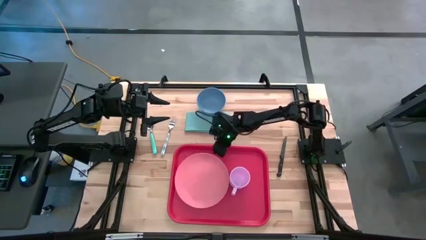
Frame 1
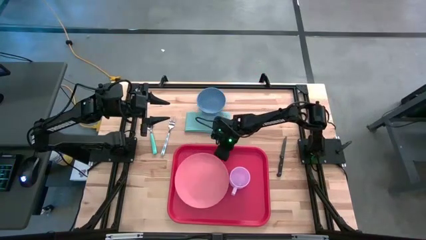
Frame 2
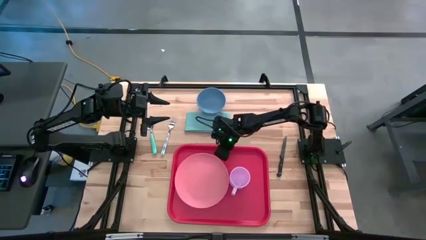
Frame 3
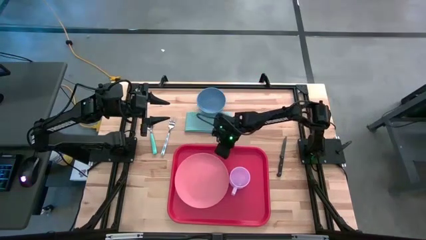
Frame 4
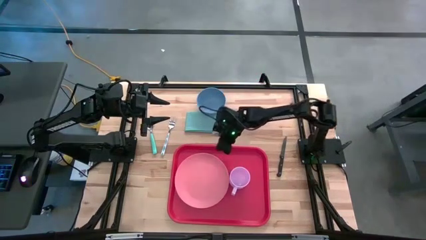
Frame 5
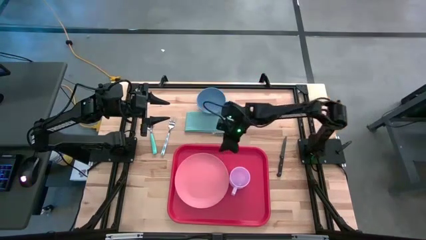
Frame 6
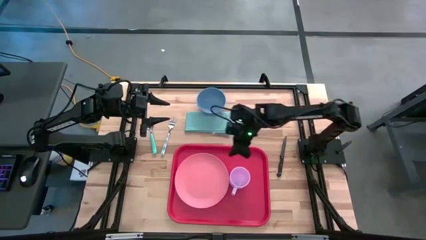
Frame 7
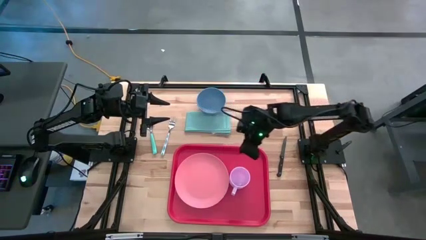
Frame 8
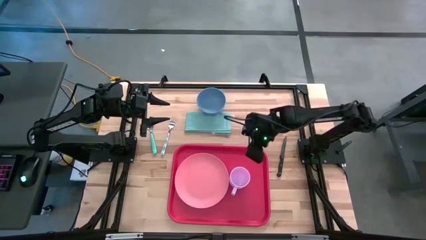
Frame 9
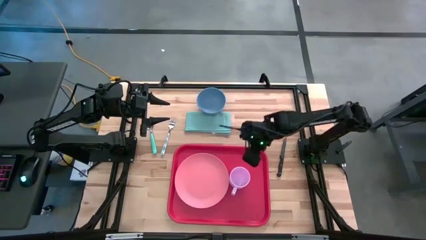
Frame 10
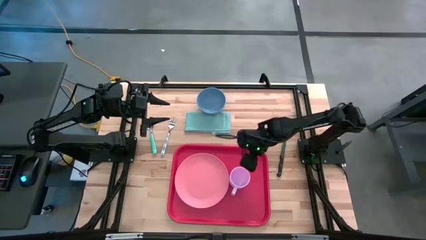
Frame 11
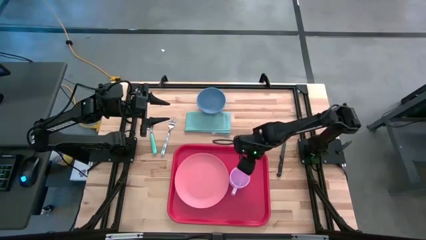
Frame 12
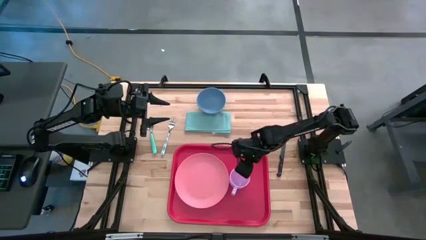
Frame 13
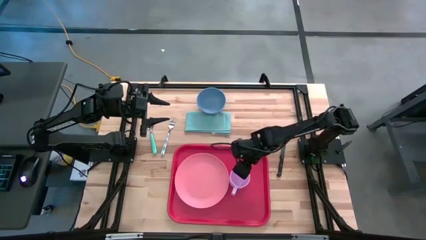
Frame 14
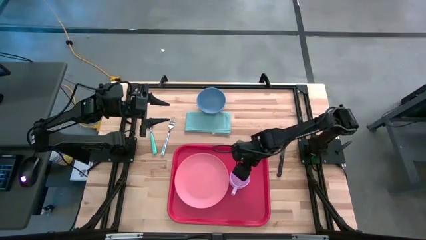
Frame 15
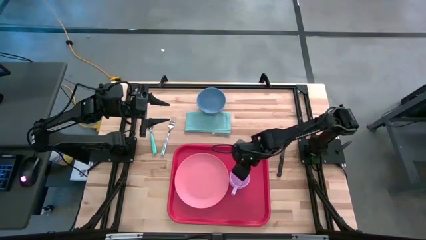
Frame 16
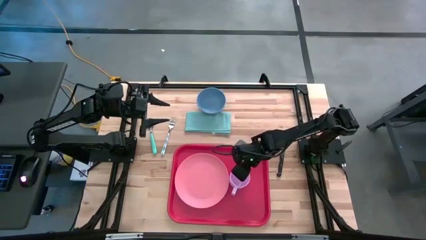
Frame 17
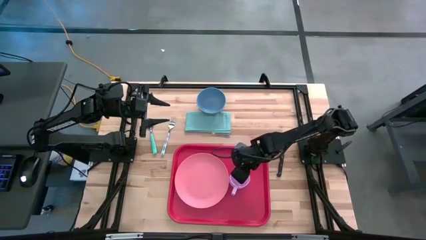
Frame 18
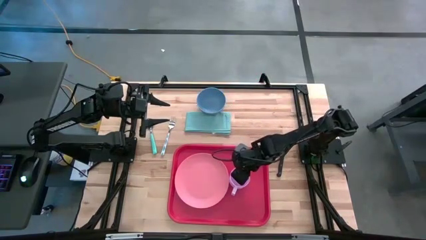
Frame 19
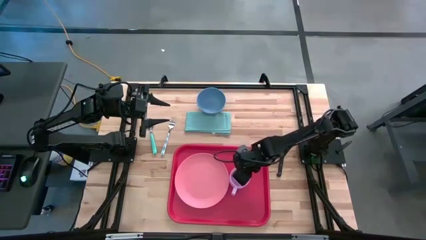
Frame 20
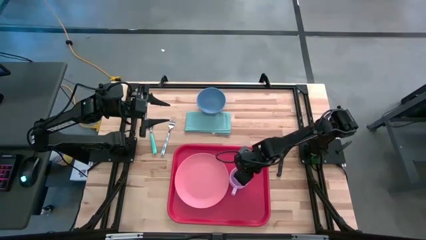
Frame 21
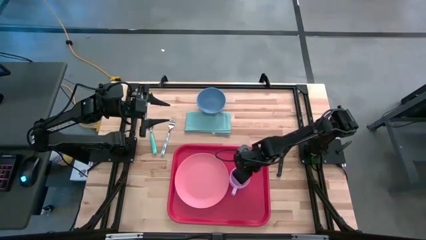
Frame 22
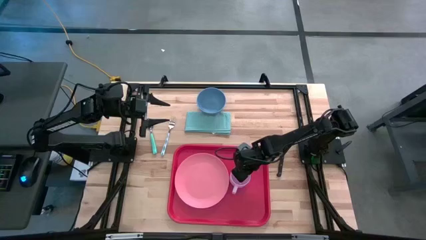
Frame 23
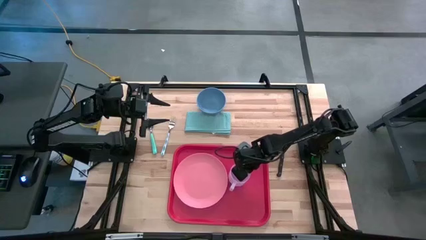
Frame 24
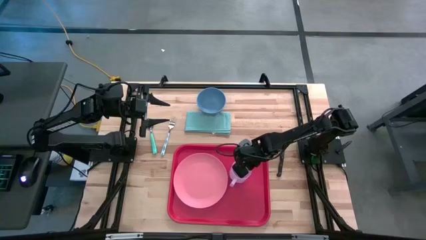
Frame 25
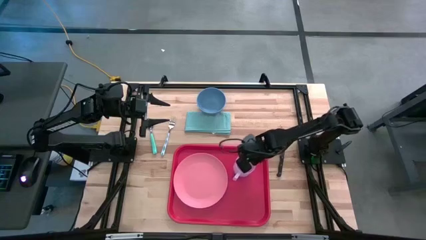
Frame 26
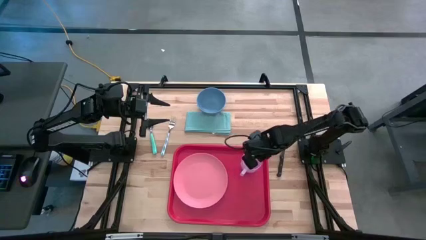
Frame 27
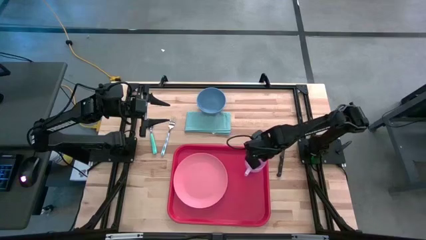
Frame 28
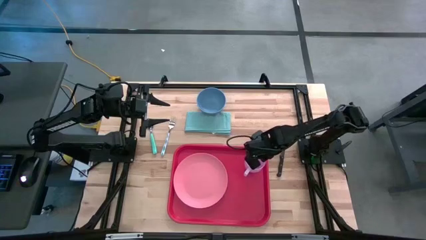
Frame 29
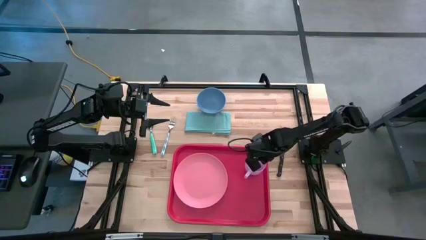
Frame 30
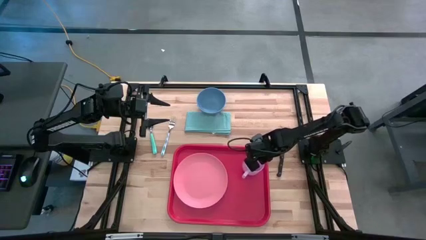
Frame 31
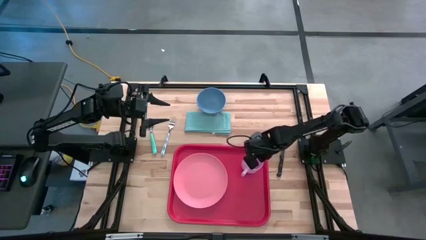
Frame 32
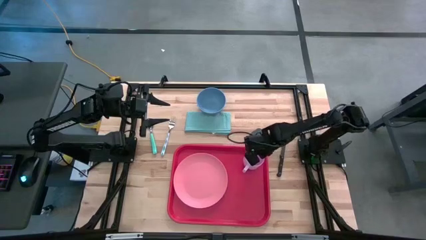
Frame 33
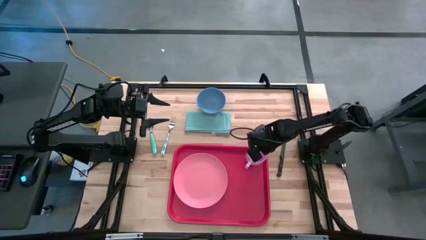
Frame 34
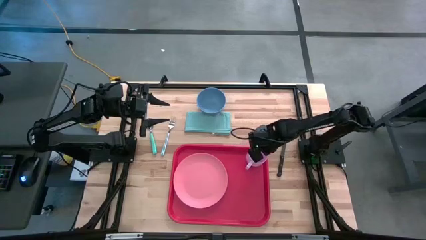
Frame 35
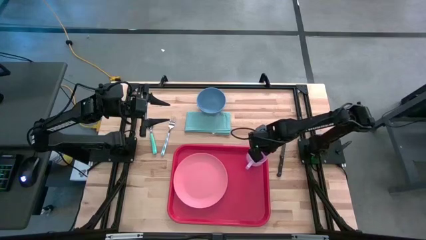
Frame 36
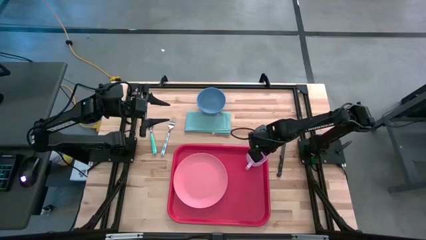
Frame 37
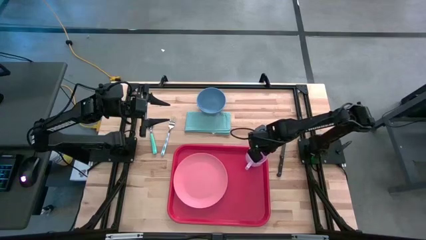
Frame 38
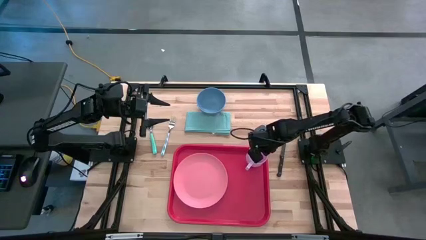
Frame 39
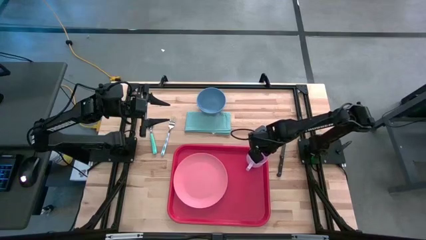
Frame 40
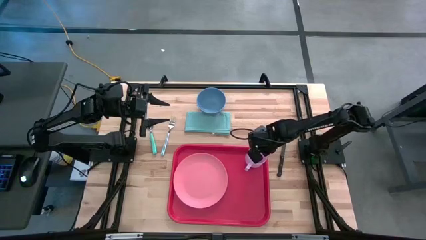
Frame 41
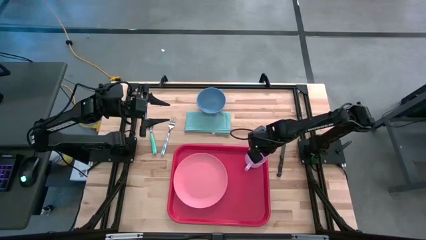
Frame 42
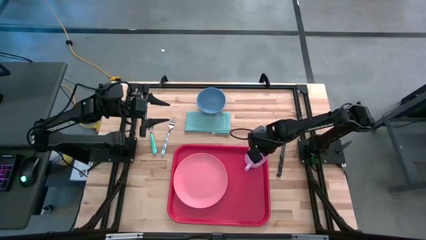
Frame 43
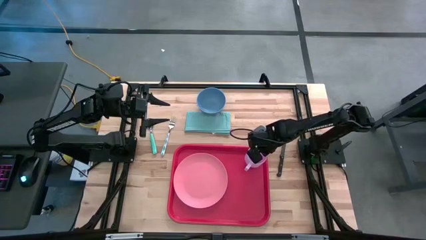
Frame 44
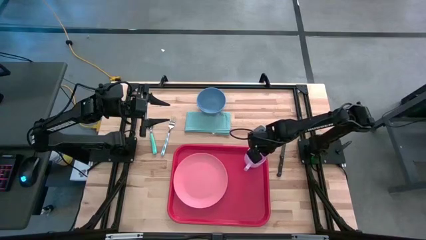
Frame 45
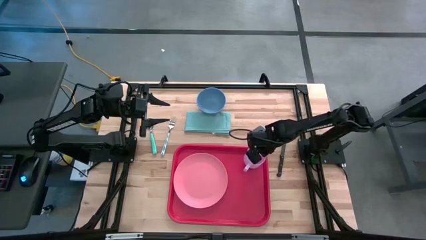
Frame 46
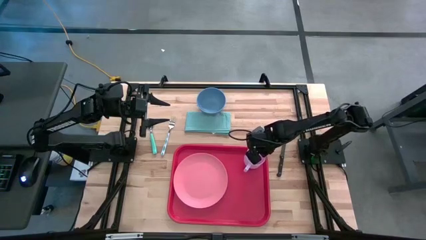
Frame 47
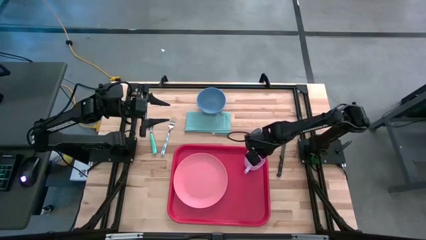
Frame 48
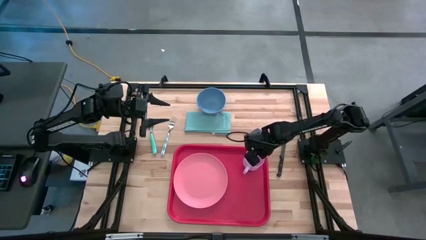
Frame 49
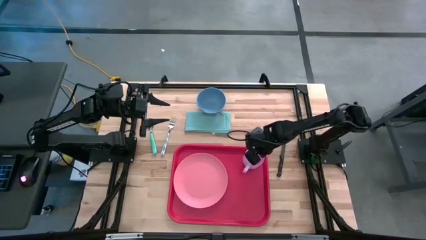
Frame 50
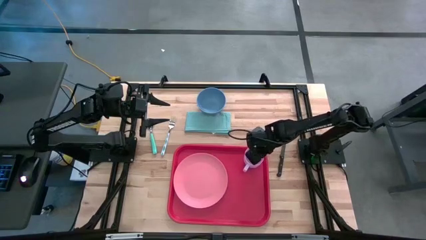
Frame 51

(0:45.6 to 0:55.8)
Task: Set up tray
Adjust the purple mug

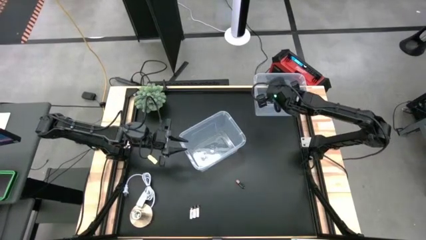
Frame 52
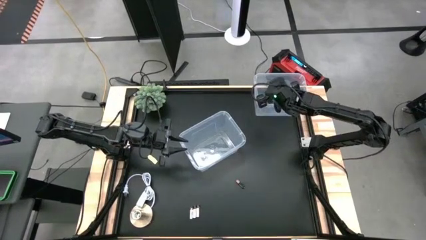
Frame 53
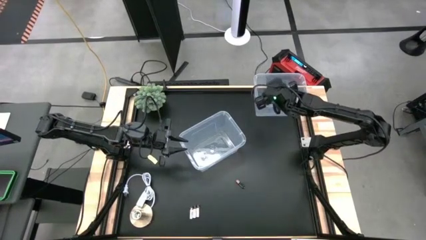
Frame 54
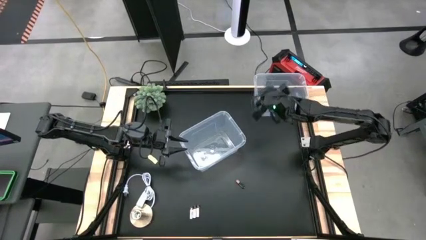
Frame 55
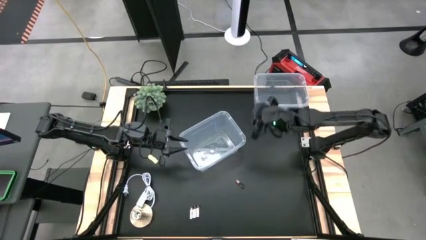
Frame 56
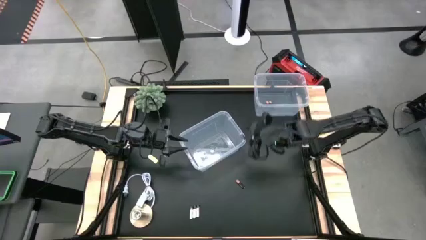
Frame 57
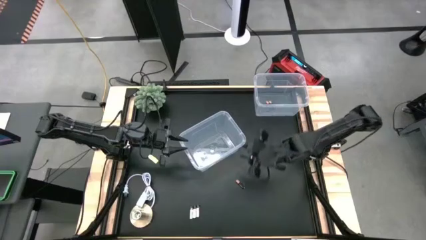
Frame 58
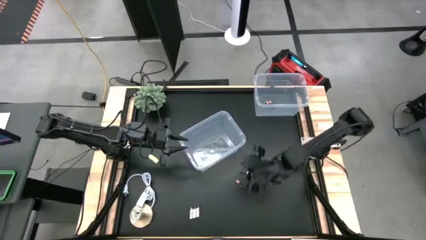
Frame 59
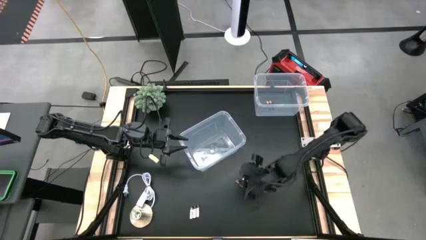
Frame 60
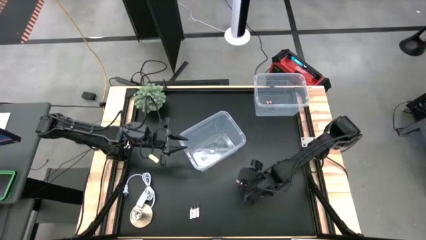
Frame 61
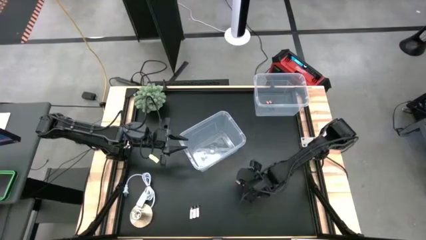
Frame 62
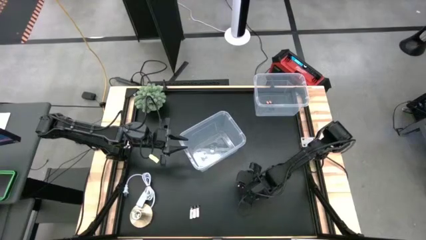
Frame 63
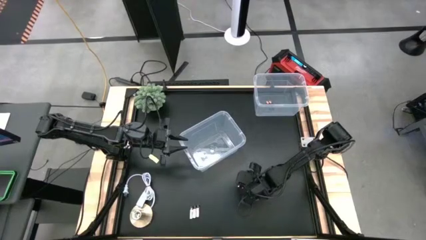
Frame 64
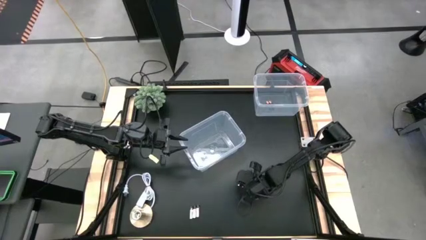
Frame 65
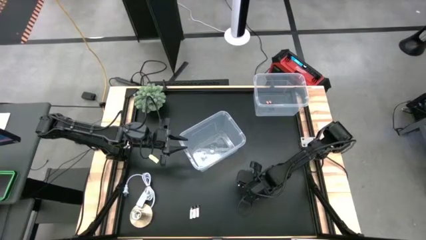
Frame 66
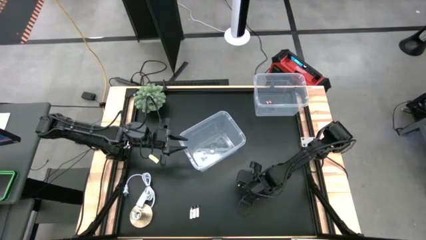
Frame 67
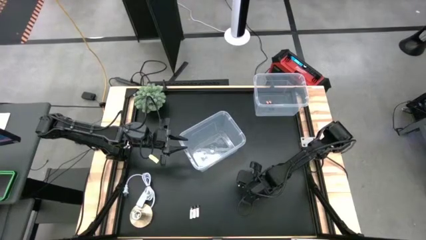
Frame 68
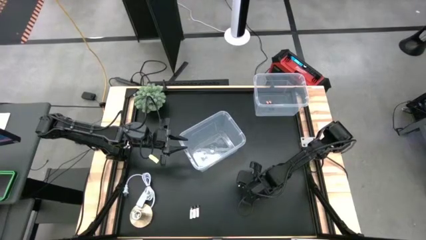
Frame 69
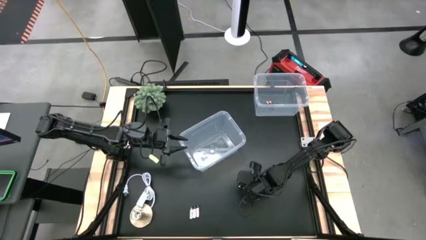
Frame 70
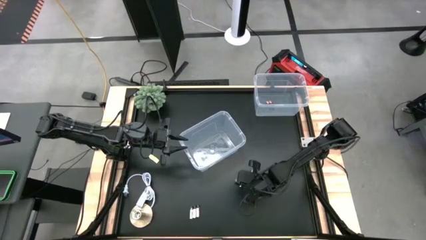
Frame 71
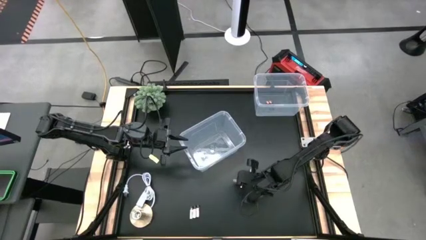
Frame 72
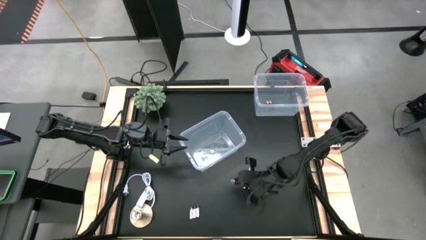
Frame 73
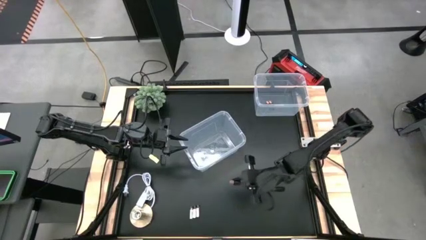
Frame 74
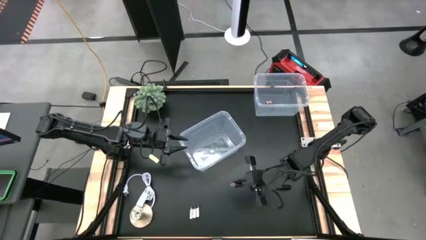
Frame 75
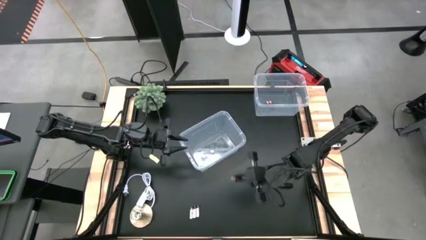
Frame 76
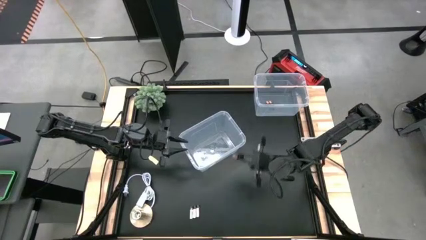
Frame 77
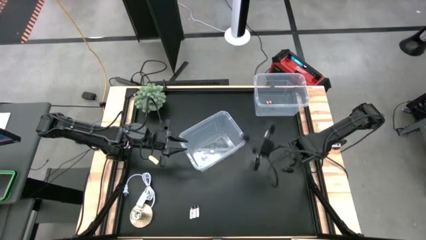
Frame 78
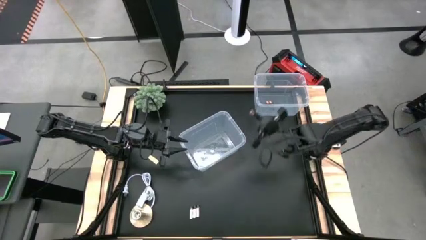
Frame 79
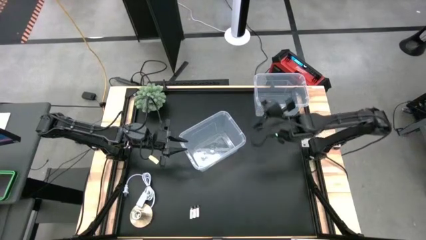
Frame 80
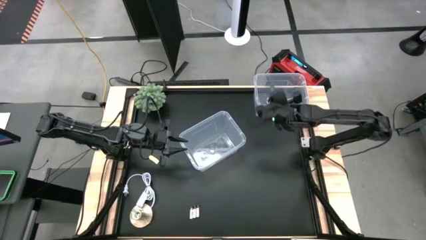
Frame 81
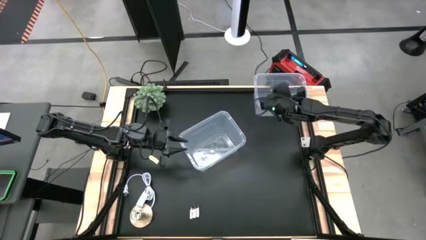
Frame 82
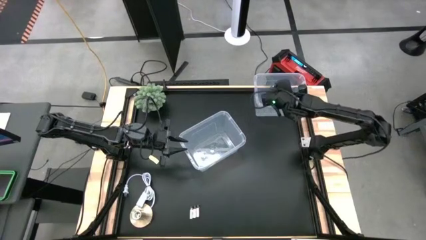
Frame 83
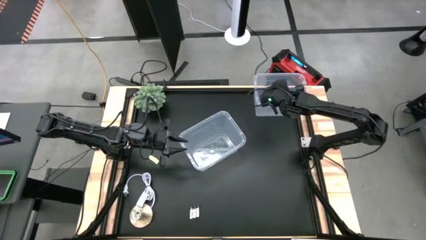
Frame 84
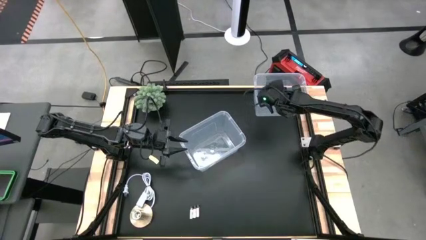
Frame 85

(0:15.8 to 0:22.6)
Task: Sort batteries
Put the black battery into the top transparent bin
